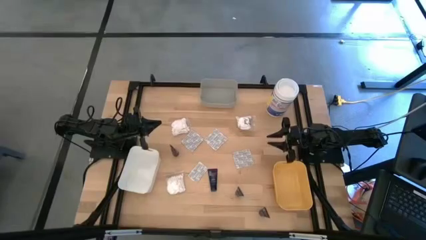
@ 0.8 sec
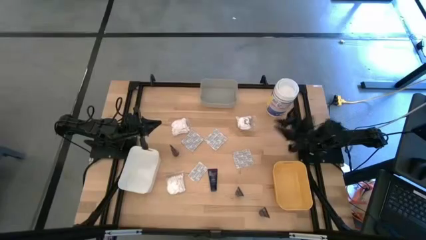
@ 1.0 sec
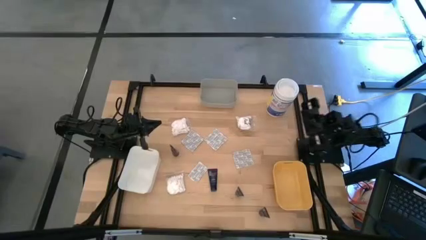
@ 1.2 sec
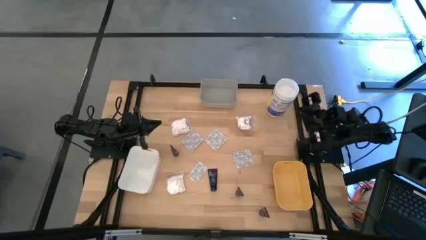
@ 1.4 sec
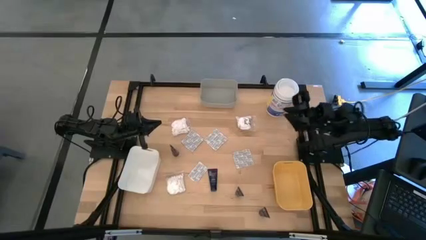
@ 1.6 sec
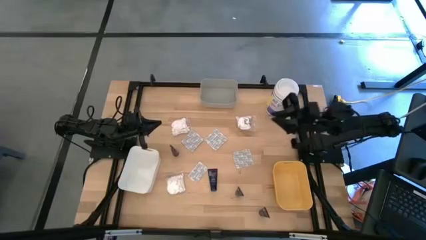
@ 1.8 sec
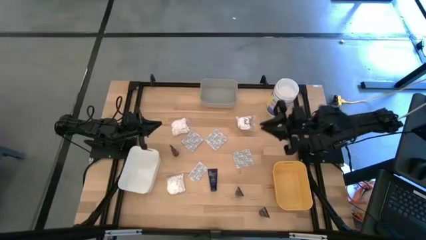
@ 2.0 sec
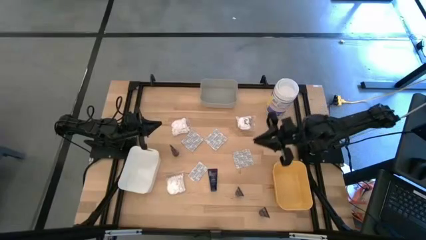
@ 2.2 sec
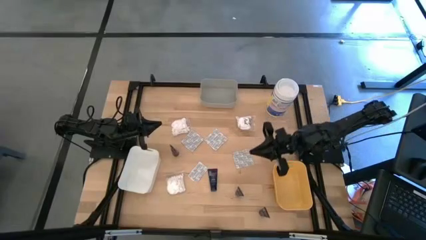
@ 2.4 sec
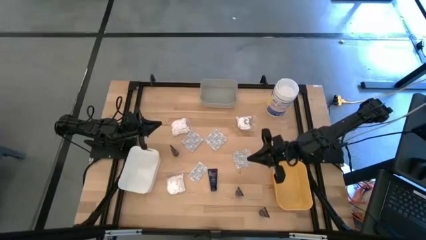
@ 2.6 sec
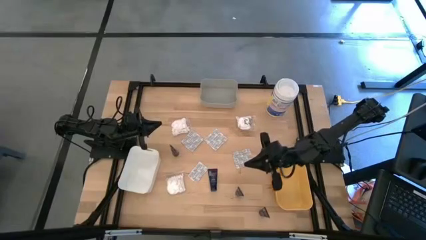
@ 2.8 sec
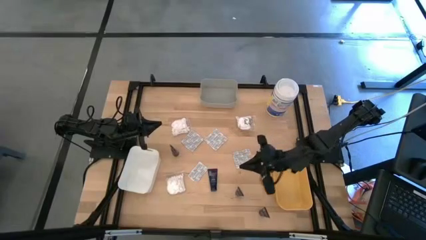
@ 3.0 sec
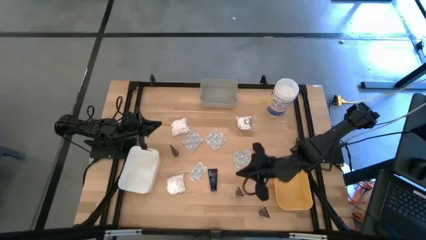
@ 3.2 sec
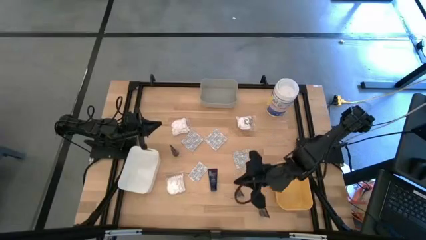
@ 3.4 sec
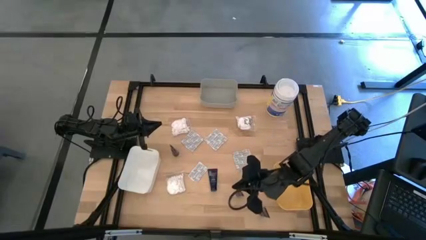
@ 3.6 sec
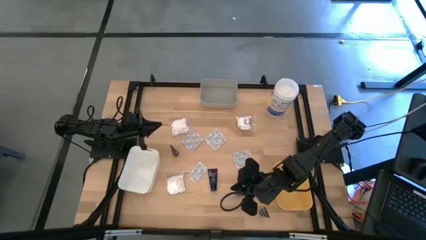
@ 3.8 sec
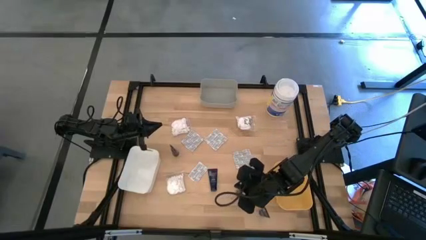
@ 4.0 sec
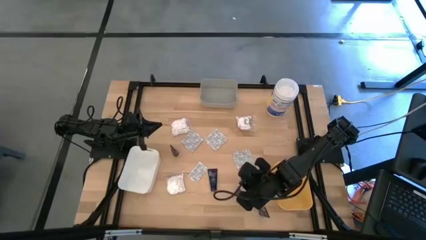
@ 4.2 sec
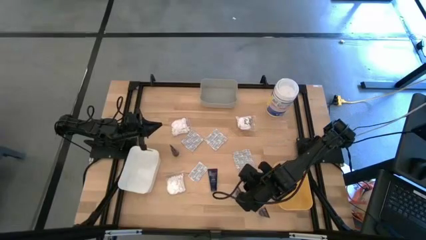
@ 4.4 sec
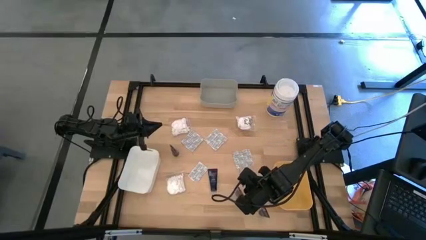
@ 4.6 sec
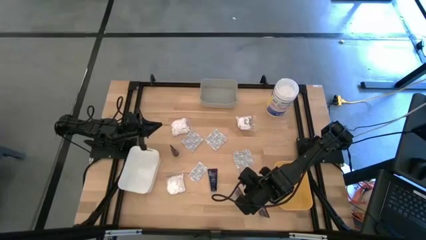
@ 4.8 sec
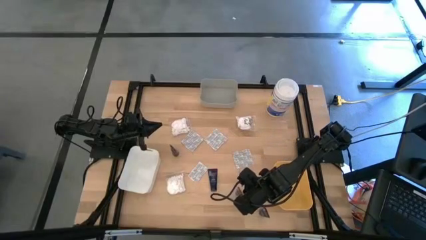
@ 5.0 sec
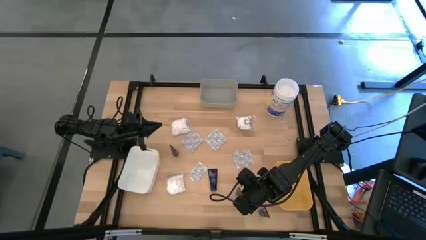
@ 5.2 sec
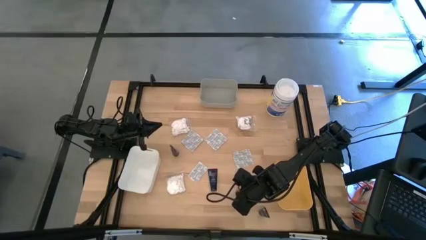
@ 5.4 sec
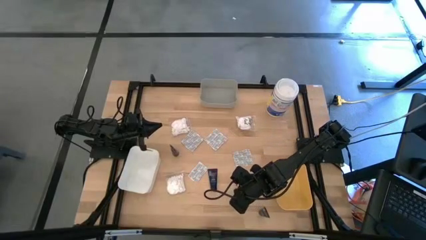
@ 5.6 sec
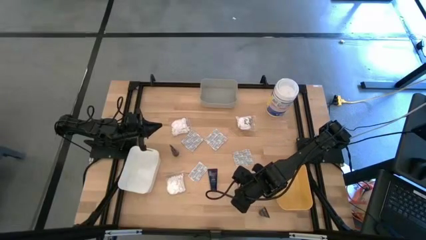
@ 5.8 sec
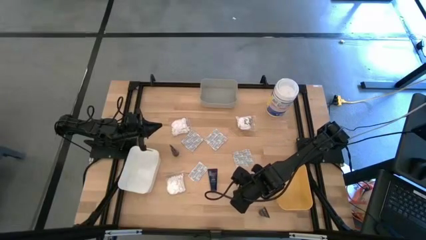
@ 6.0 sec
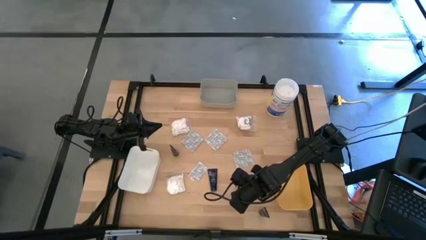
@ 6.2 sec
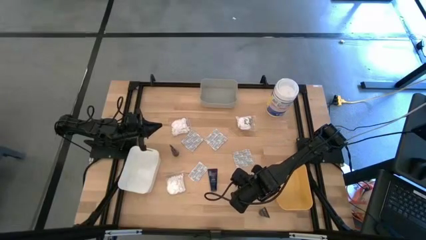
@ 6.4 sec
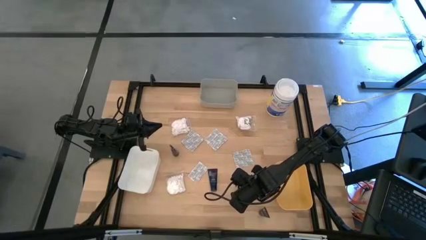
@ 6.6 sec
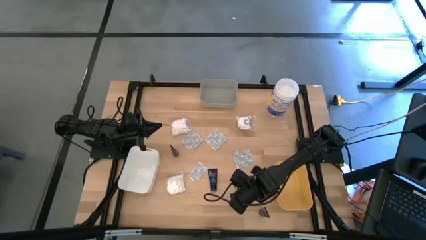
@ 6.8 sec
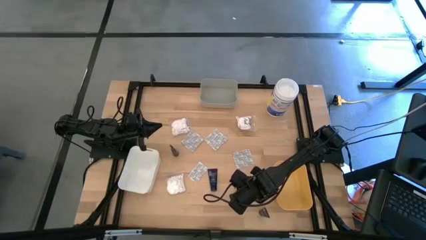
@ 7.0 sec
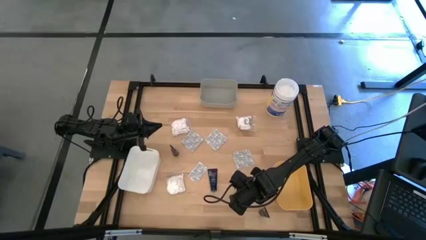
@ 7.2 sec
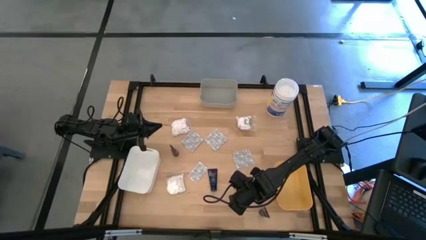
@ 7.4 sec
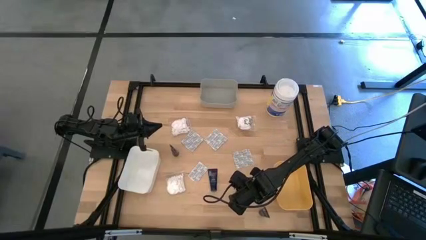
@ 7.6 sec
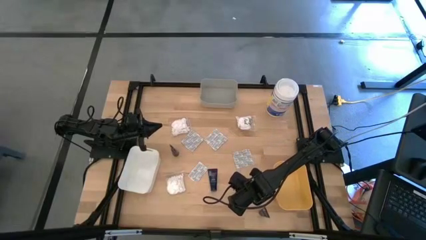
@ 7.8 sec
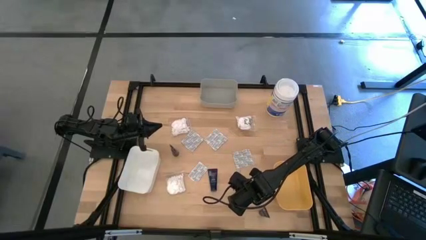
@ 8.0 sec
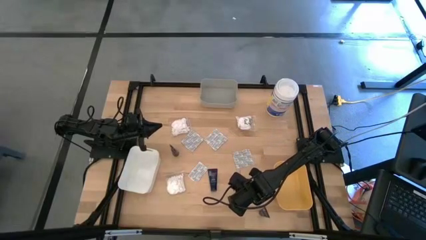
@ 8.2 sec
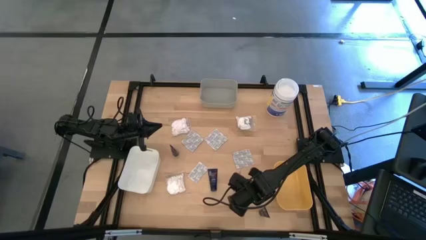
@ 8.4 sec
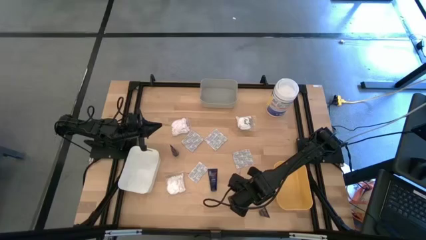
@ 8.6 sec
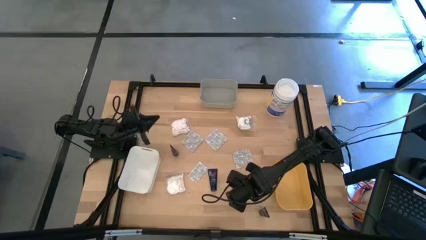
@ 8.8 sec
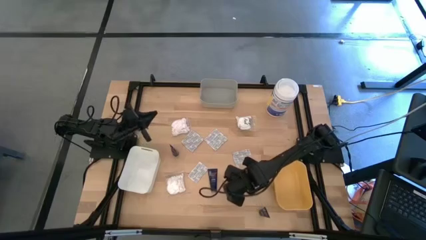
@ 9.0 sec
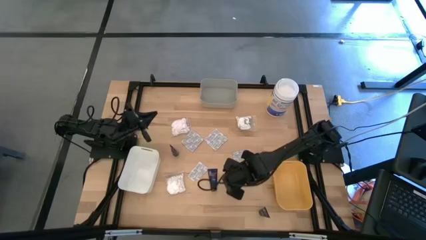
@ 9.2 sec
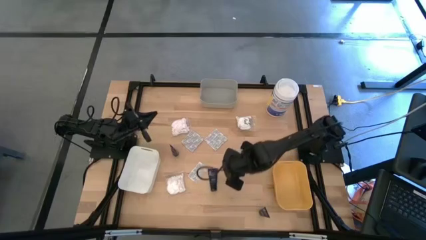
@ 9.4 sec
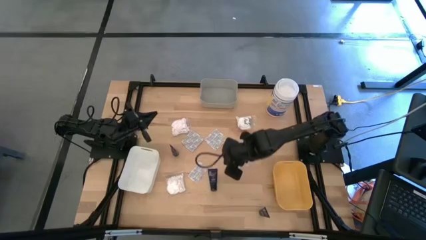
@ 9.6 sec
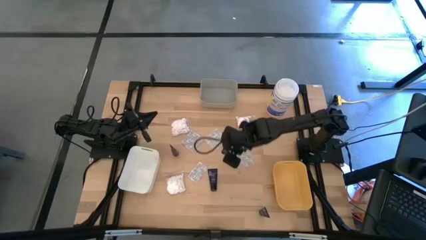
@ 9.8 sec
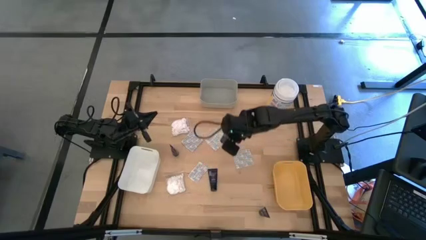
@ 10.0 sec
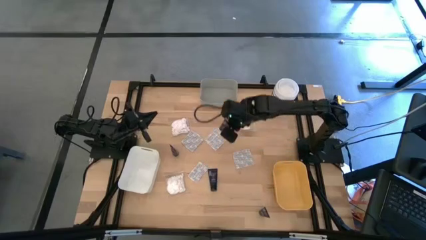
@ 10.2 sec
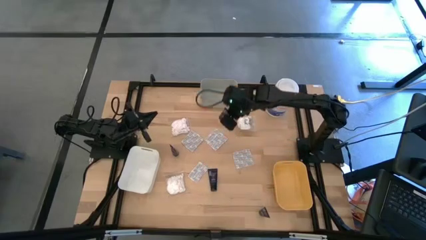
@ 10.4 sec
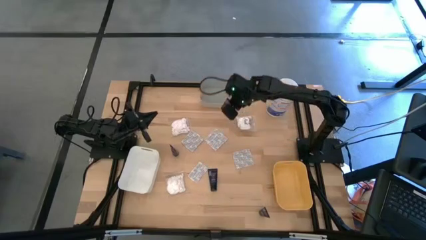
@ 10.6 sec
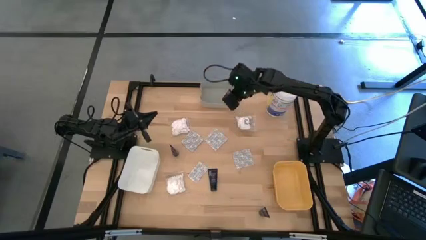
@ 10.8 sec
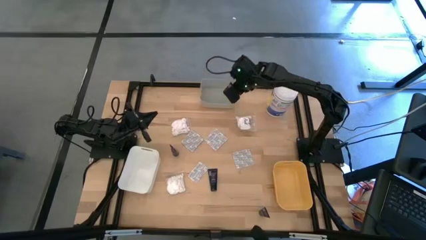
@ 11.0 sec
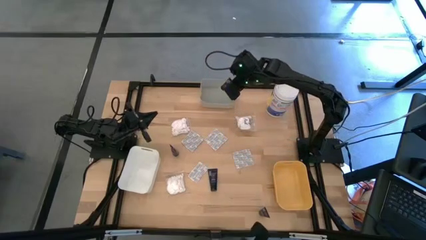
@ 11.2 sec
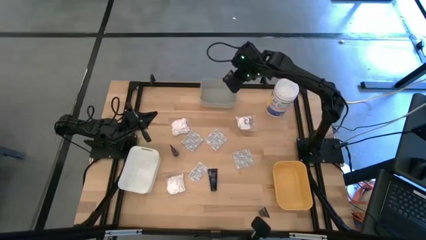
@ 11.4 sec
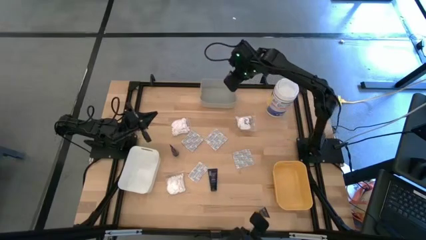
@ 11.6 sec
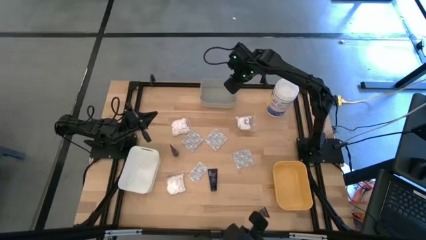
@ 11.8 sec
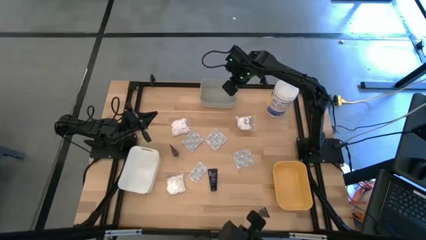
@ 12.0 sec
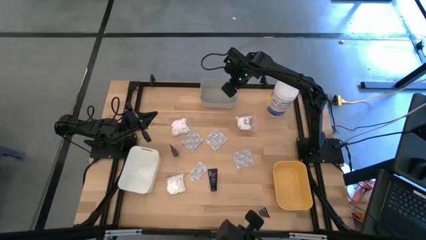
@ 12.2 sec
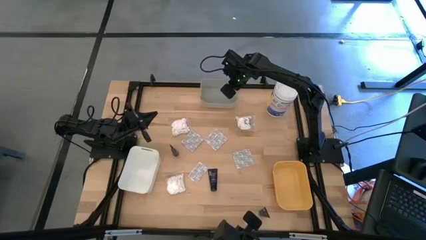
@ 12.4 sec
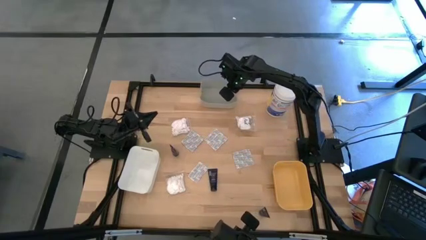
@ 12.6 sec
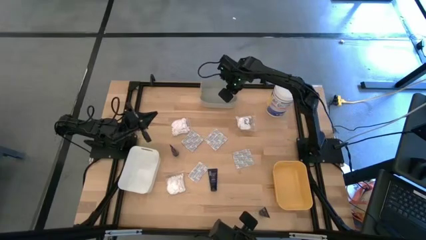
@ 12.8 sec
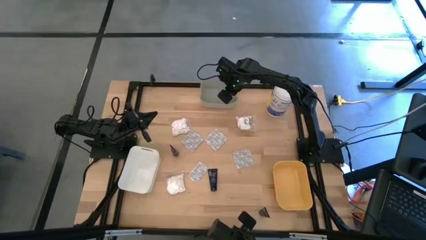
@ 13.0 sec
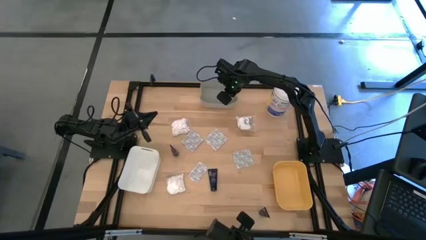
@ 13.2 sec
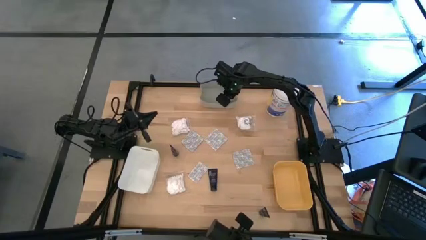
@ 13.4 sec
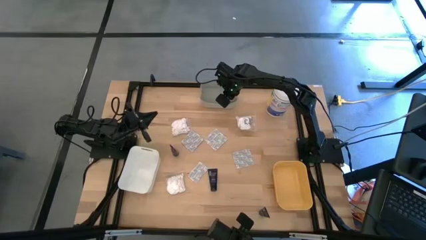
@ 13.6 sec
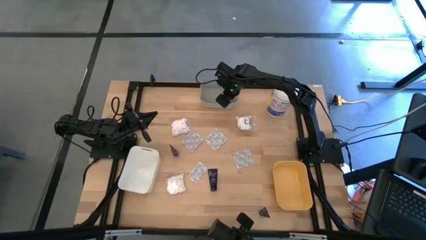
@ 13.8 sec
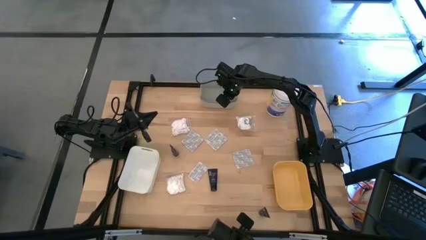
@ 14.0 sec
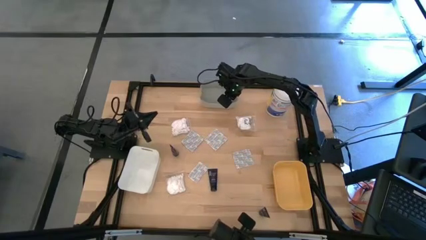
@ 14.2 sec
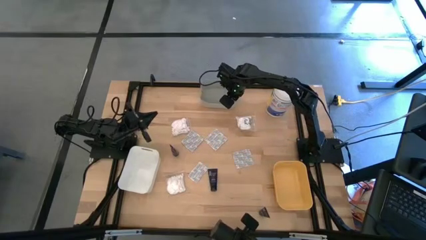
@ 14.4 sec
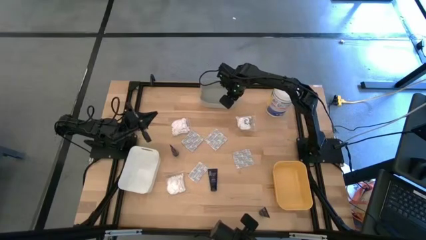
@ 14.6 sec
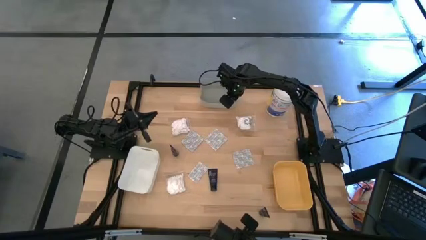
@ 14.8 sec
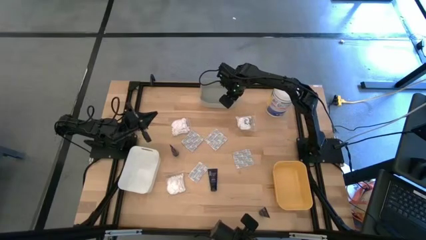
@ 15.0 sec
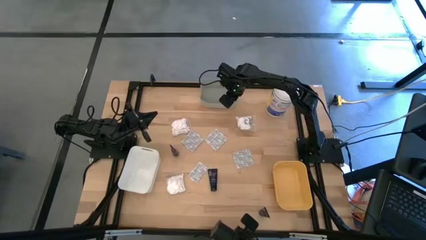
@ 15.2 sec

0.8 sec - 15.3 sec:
Task: Pick & Place Travel size toiletries
Put the shave cream into the gray bin
